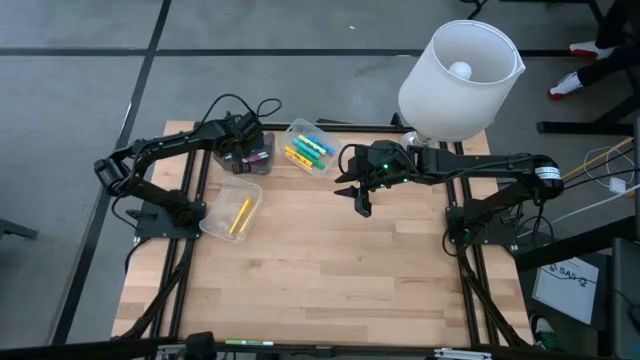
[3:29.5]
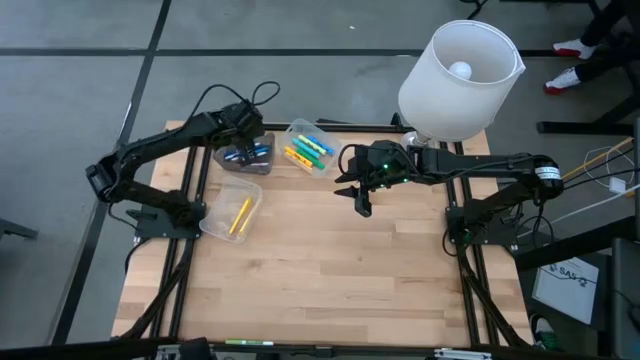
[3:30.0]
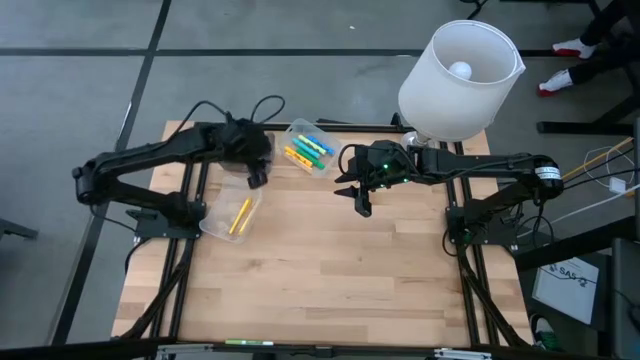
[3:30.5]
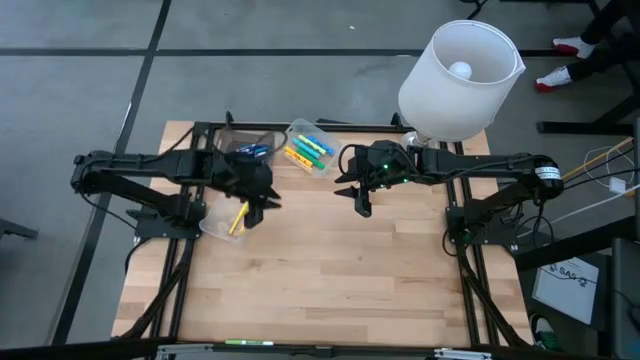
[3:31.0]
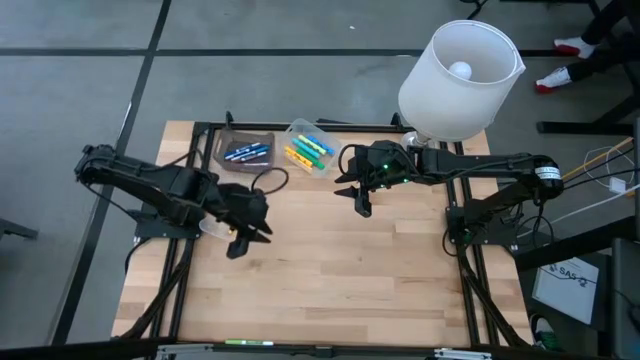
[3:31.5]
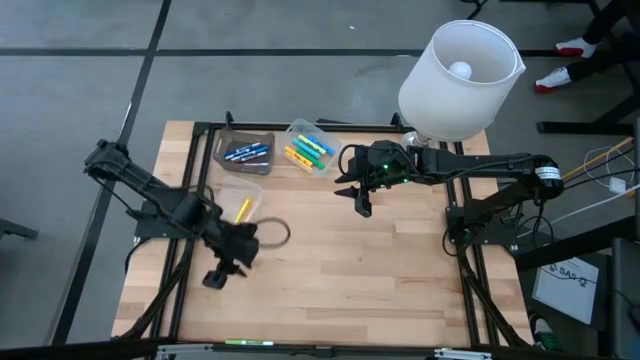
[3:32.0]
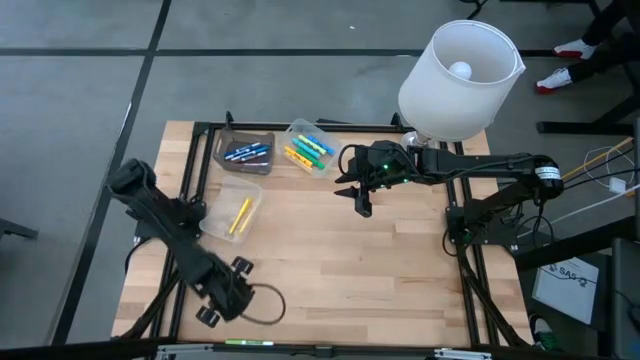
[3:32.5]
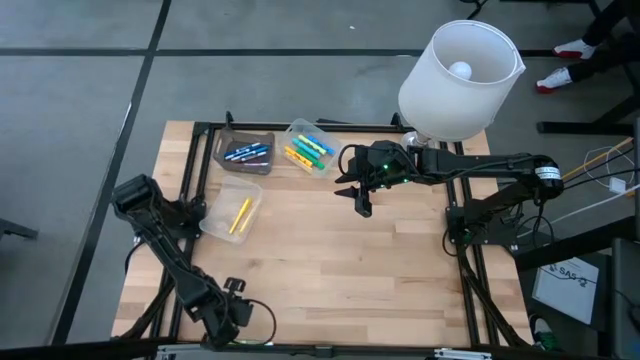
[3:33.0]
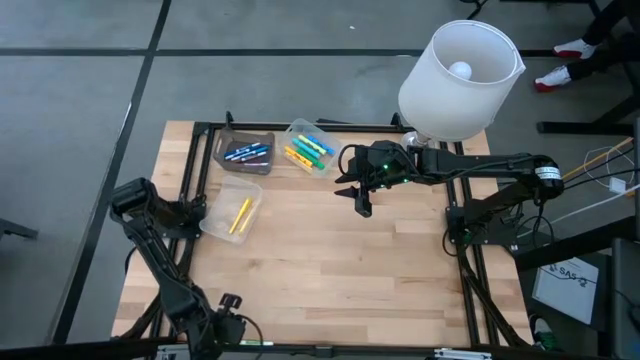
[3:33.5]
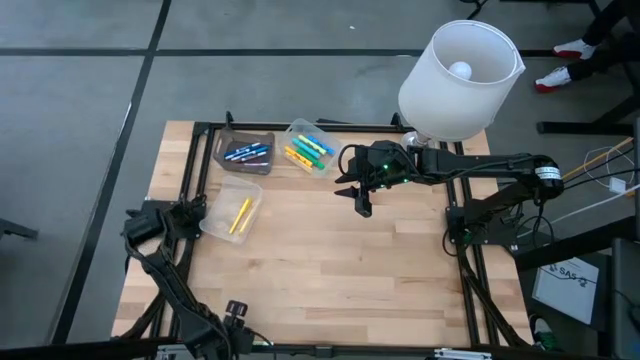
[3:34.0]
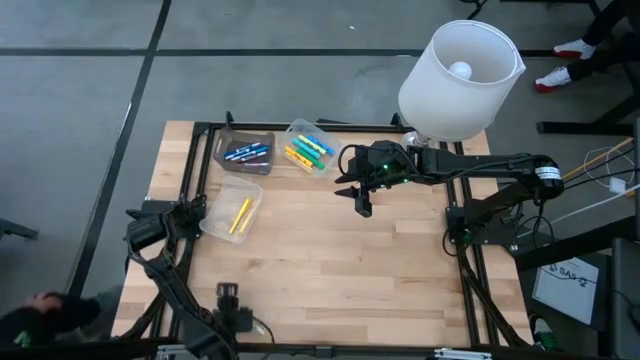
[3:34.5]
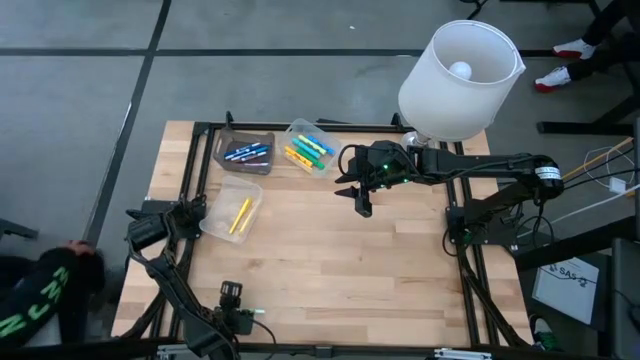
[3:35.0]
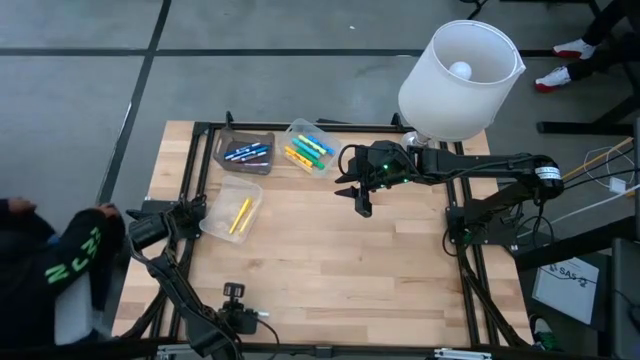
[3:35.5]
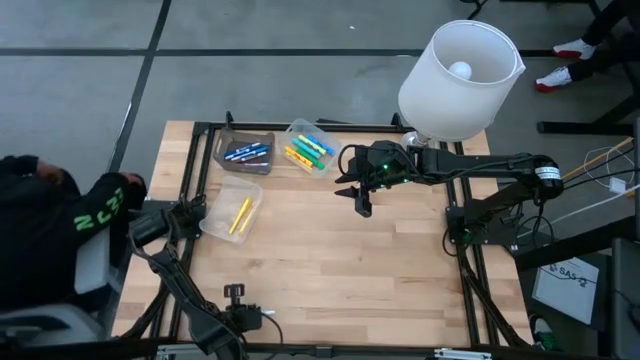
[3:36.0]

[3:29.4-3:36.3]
Task: Pick & Place Markers
Put the green marker into the black bin

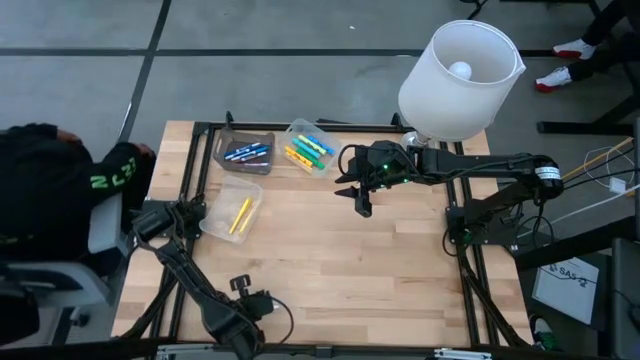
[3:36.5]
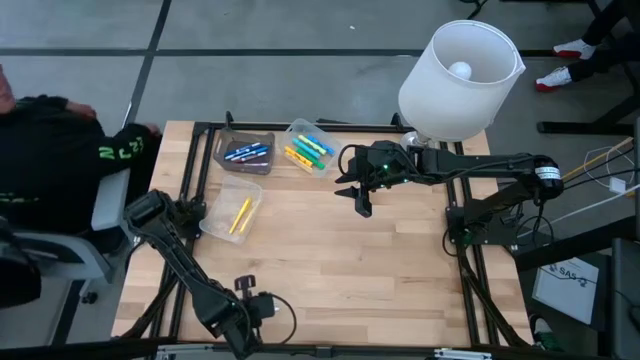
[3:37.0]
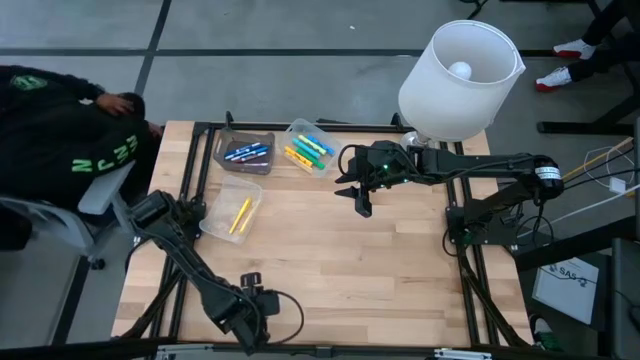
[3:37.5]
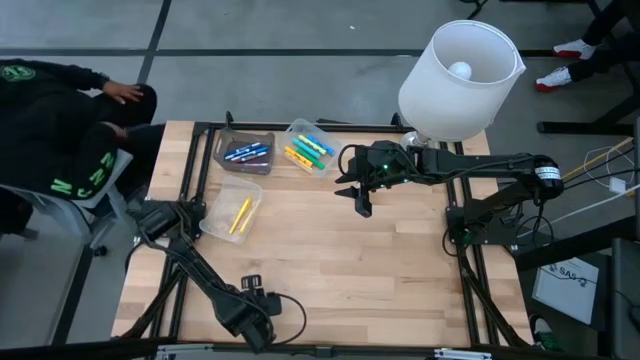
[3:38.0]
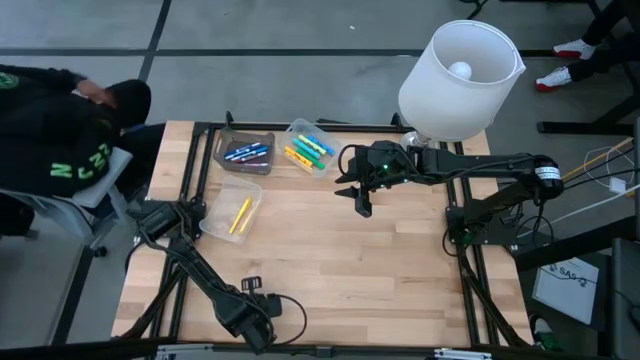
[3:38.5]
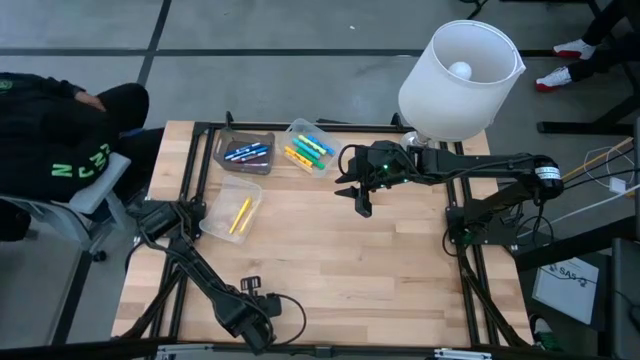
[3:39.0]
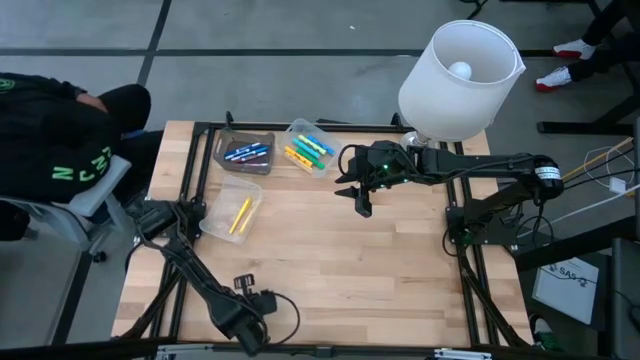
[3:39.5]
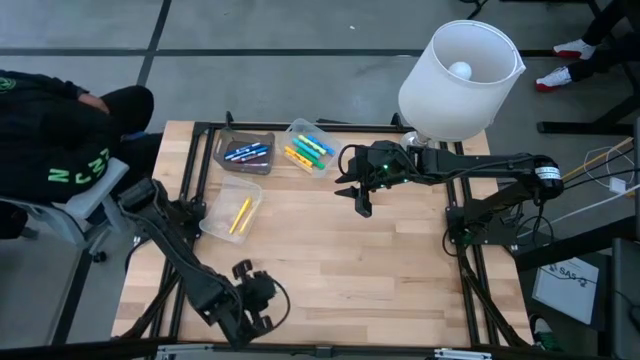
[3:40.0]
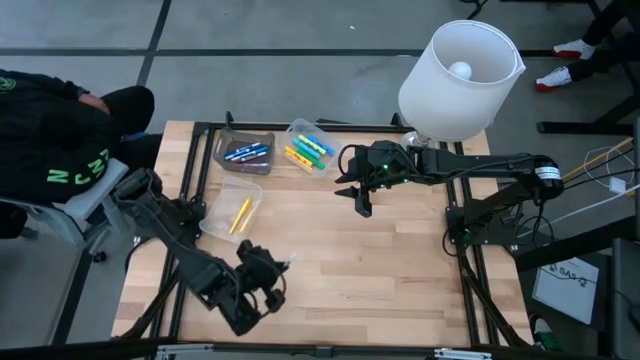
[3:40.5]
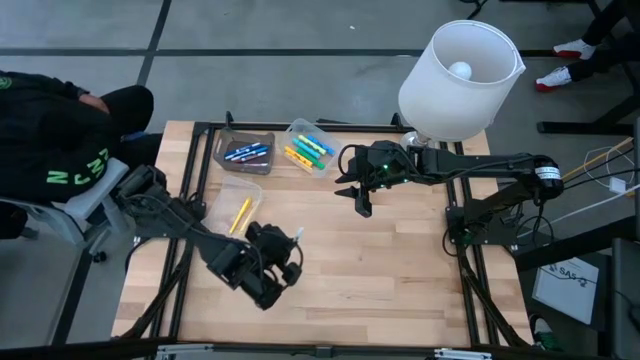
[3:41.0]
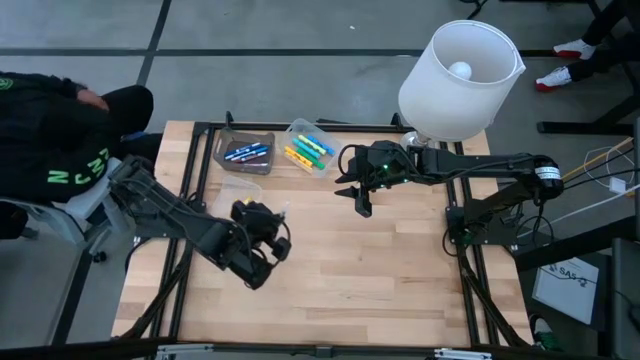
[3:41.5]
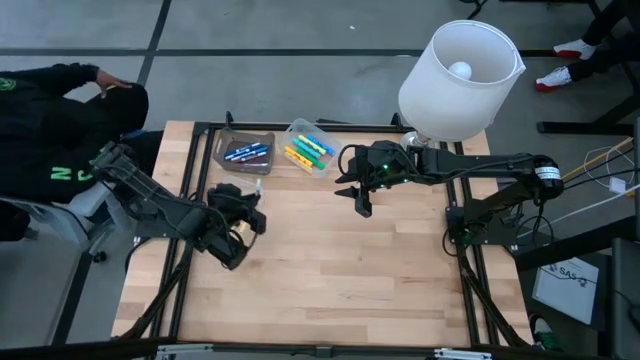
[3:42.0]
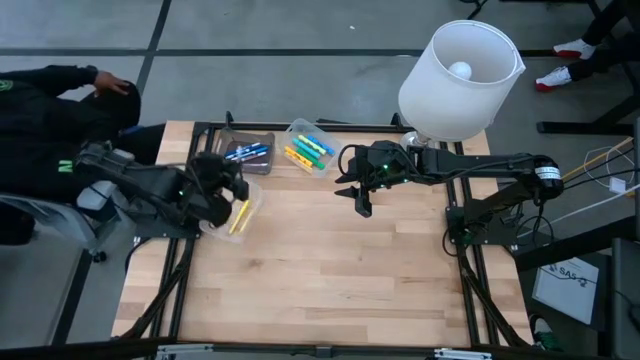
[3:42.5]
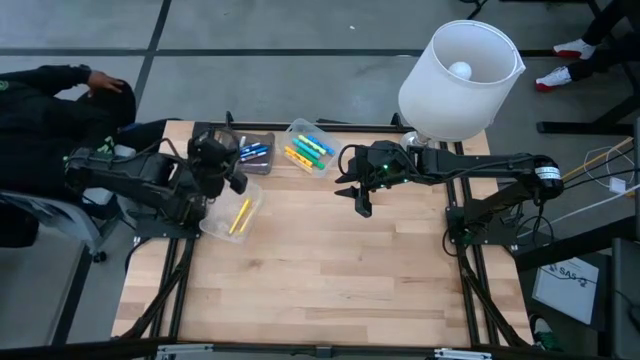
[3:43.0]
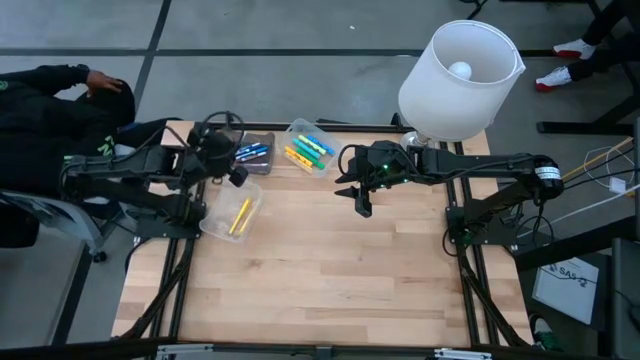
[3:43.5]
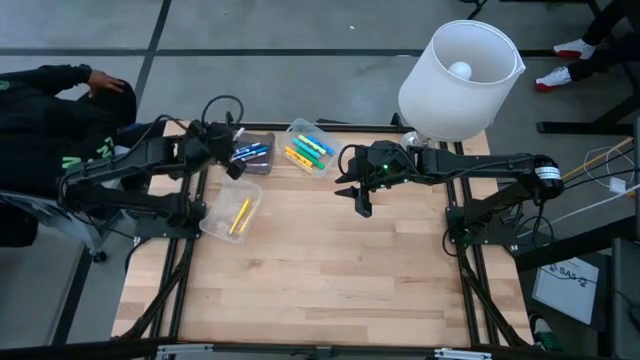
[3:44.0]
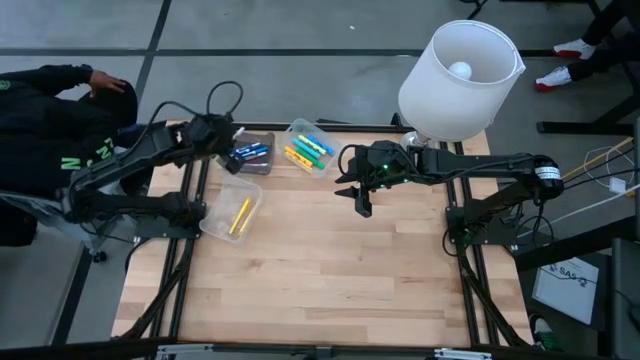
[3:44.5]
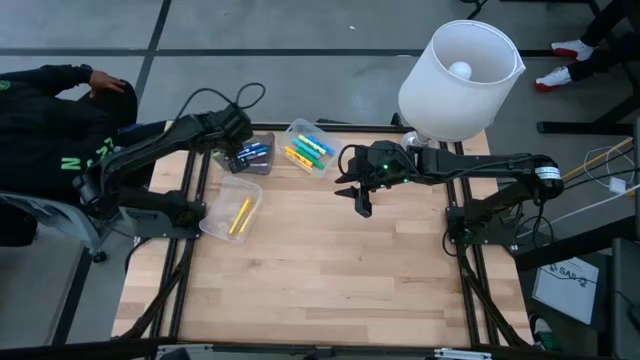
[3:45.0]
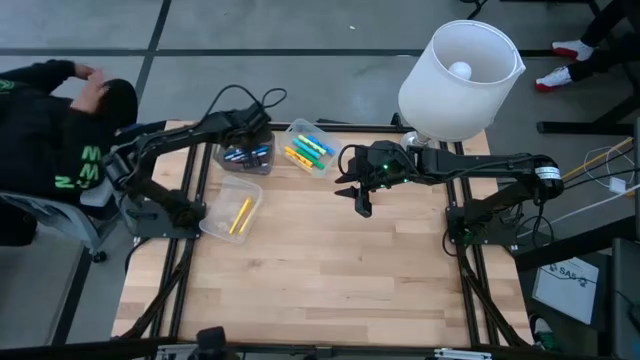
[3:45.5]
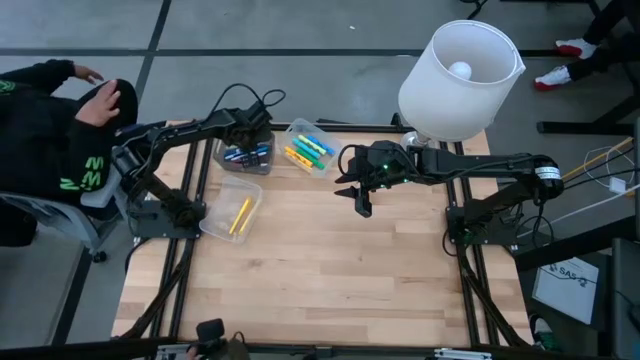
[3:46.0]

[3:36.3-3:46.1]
Put the green marker into the black bin

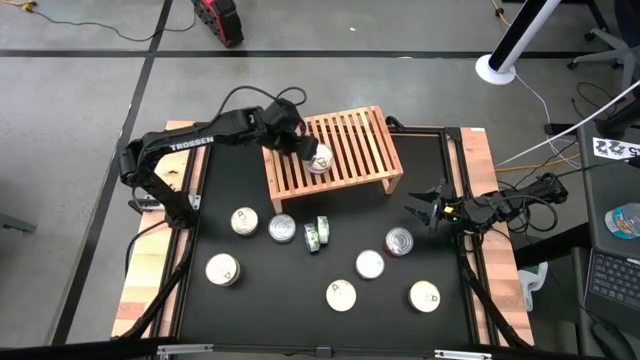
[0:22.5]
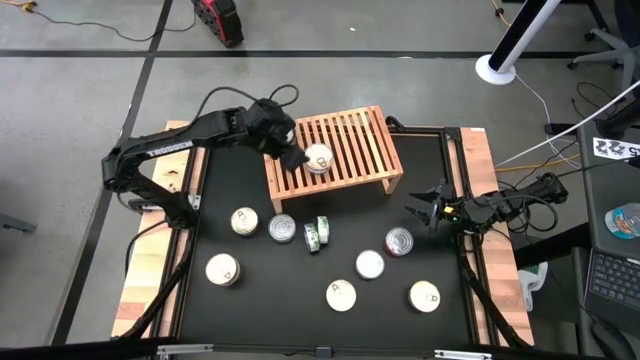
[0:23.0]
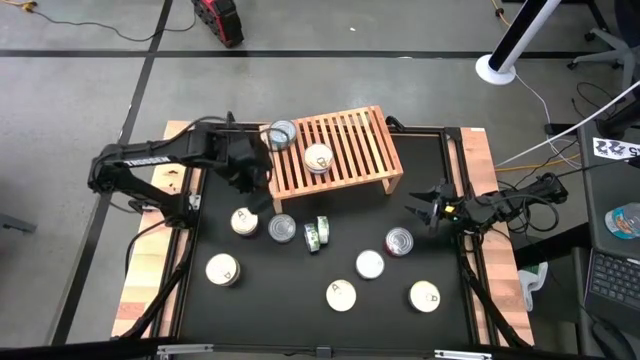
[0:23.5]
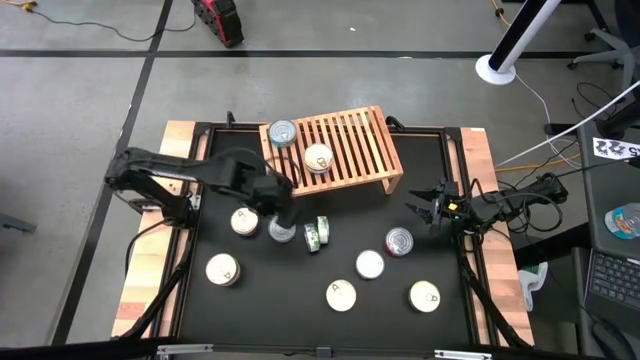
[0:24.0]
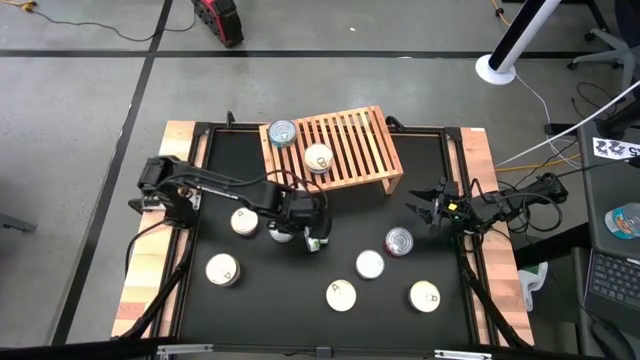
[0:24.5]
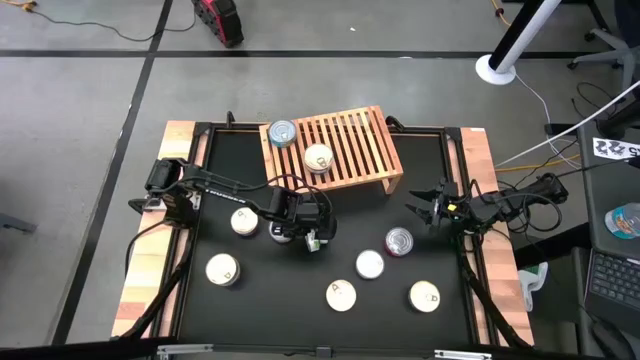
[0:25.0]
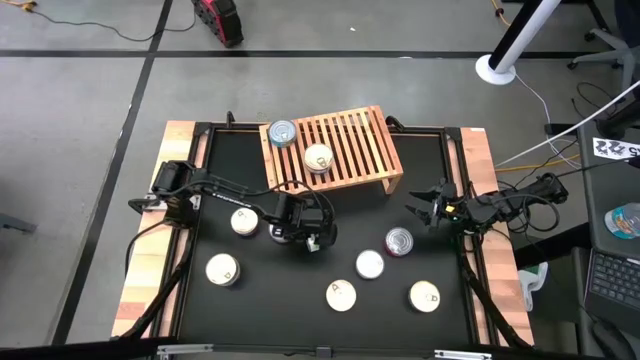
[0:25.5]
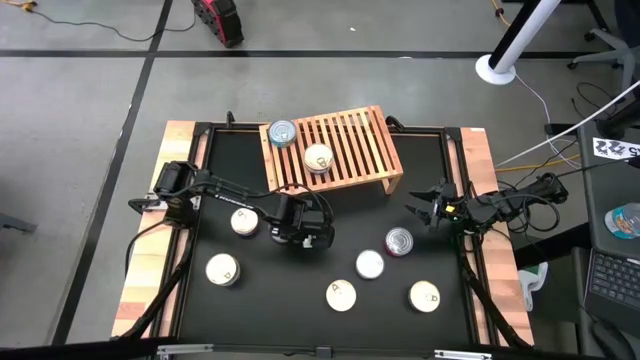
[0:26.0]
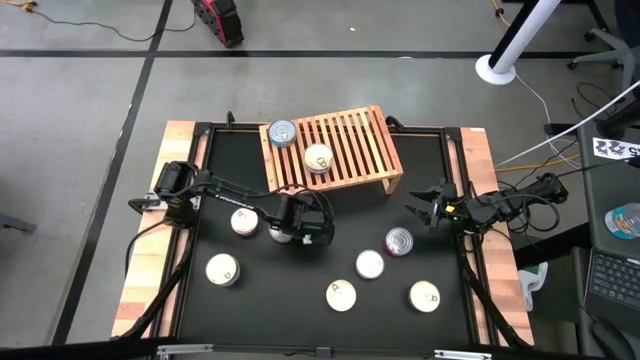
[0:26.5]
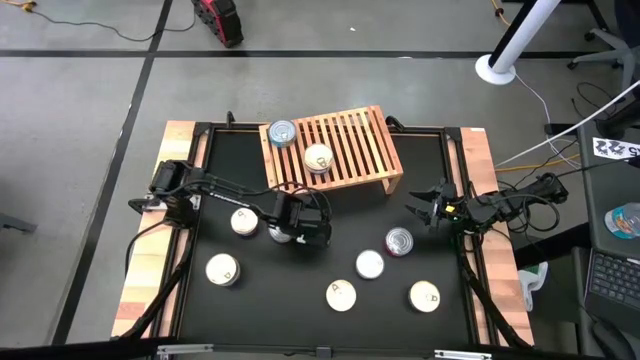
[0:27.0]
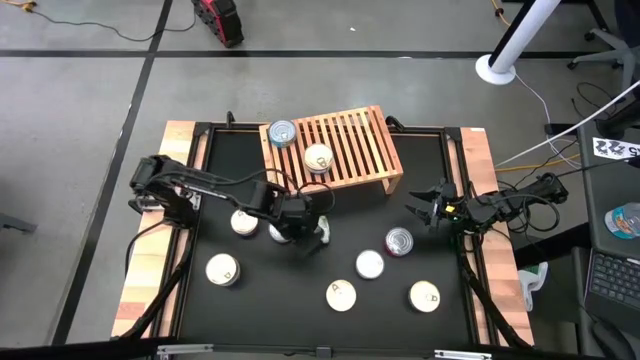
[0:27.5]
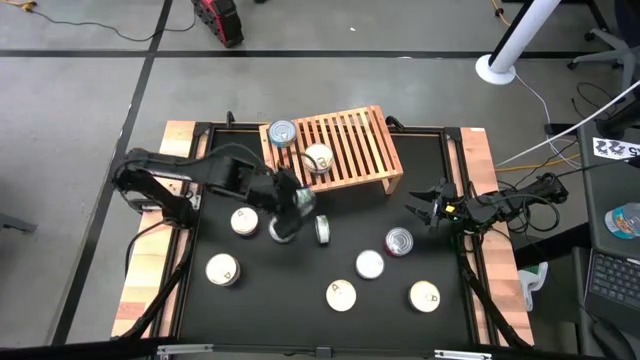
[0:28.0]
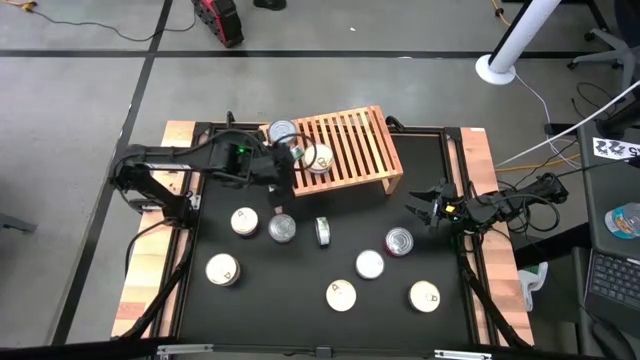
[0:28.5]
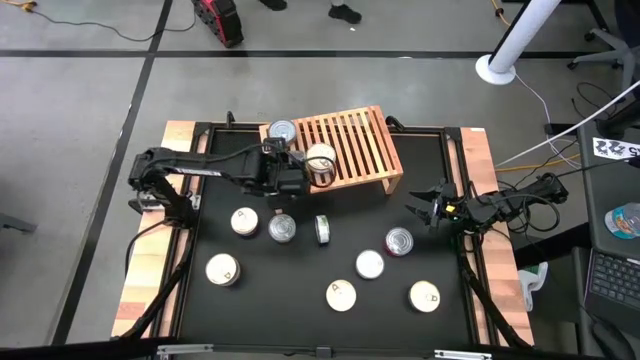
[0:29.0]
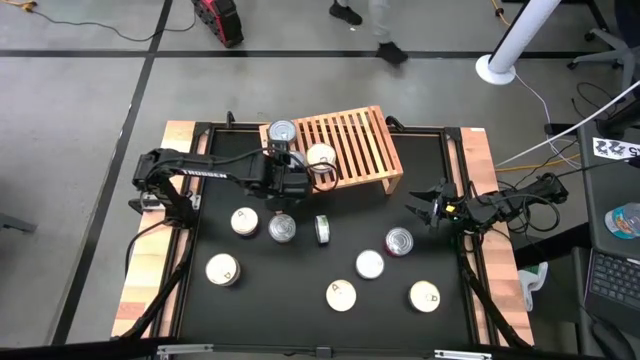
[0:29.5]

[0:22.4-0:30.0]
Task: Stack canned seafood by type on shelf
Put the green and white tuna can on the shelf
